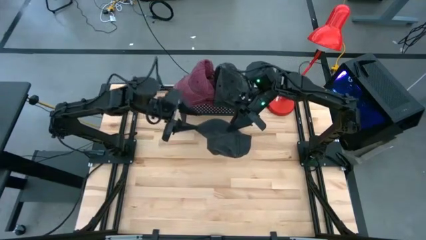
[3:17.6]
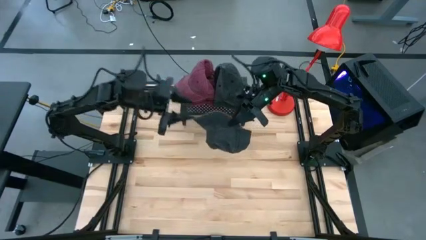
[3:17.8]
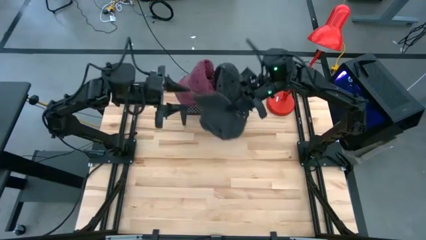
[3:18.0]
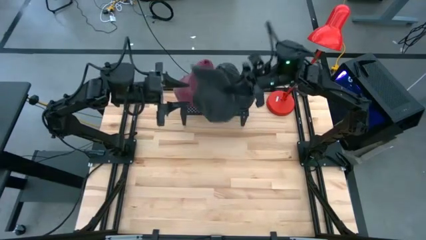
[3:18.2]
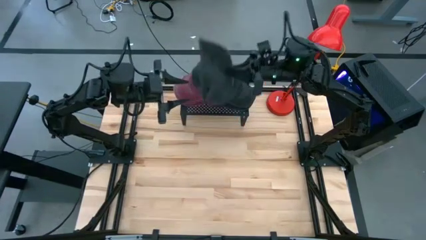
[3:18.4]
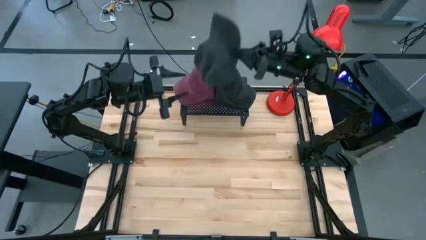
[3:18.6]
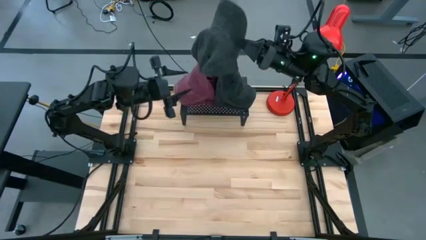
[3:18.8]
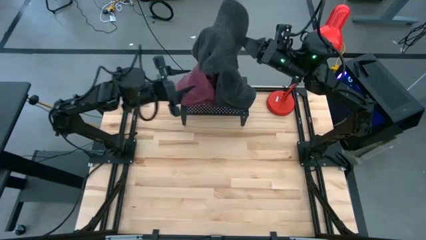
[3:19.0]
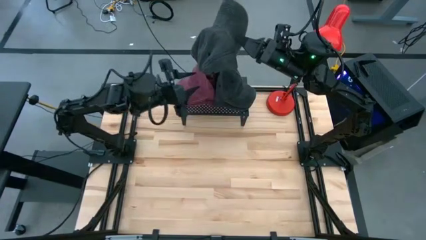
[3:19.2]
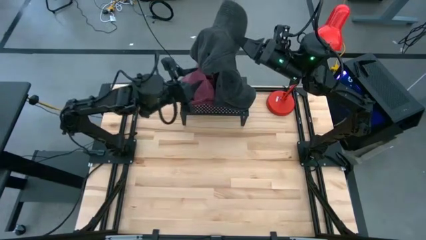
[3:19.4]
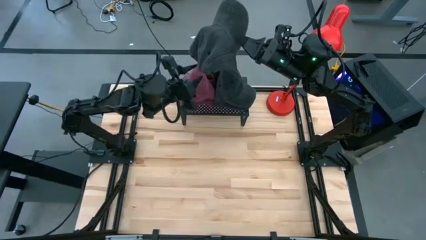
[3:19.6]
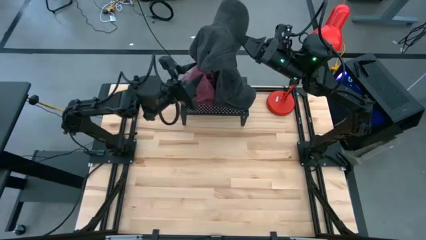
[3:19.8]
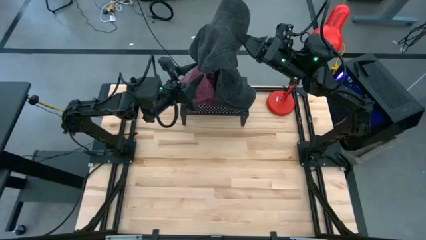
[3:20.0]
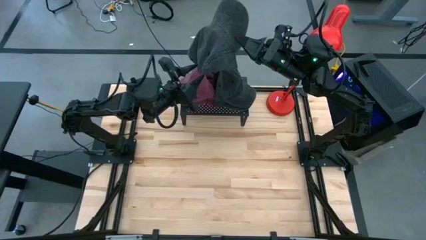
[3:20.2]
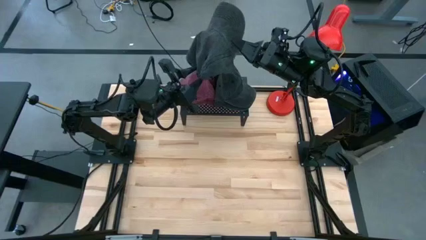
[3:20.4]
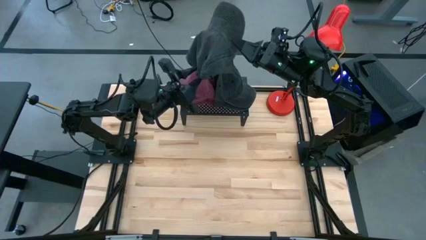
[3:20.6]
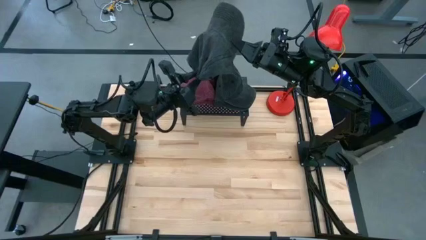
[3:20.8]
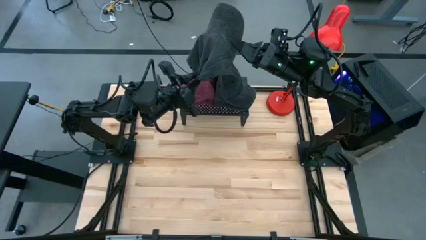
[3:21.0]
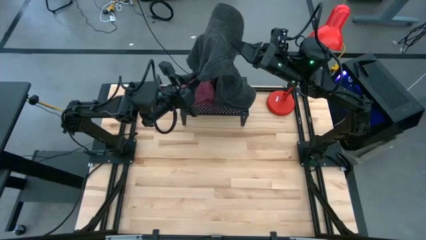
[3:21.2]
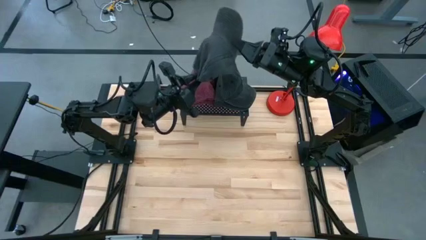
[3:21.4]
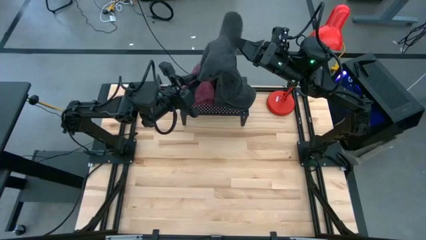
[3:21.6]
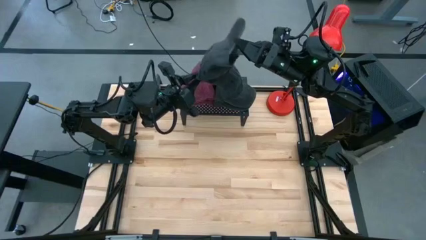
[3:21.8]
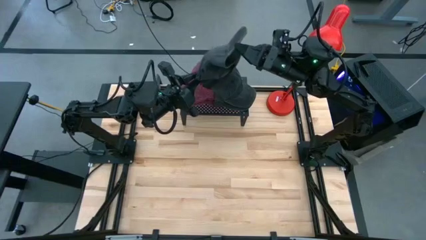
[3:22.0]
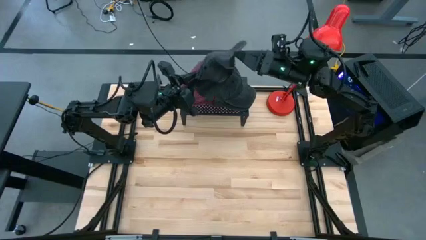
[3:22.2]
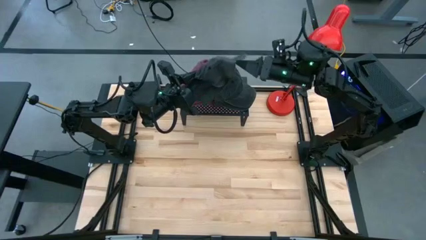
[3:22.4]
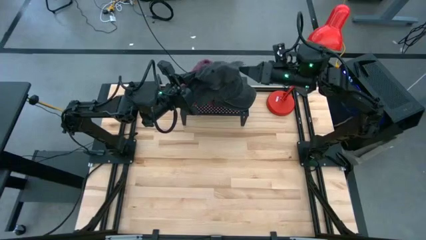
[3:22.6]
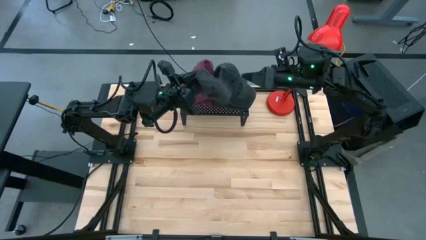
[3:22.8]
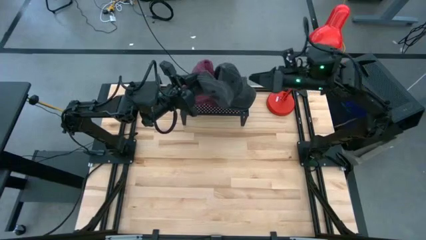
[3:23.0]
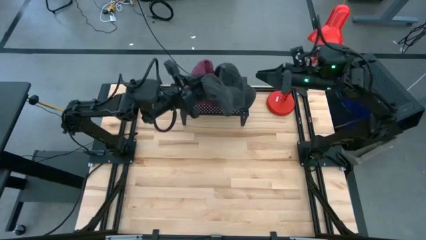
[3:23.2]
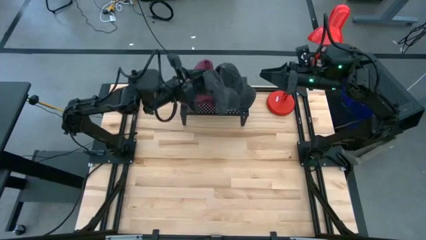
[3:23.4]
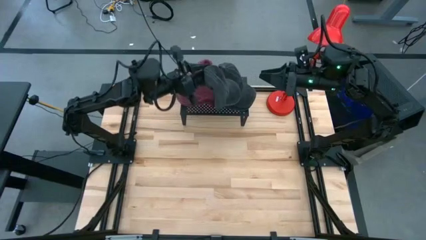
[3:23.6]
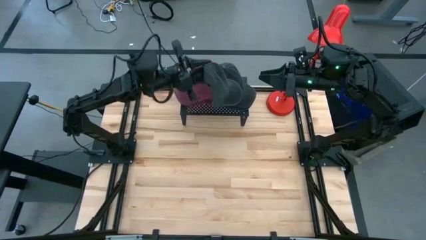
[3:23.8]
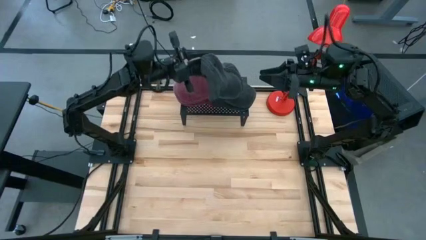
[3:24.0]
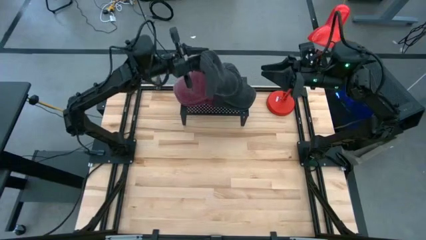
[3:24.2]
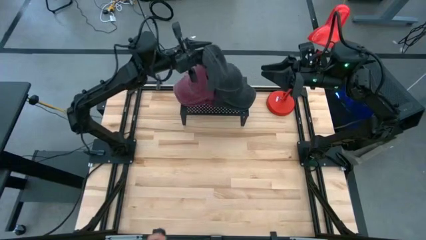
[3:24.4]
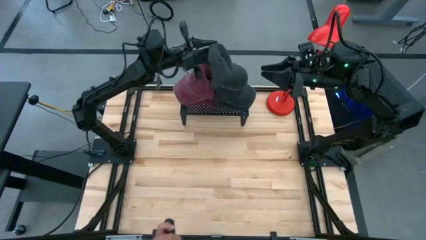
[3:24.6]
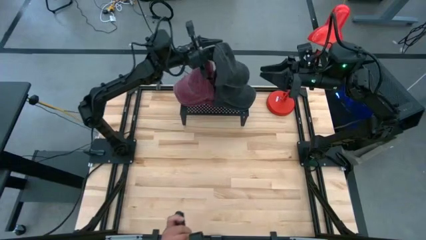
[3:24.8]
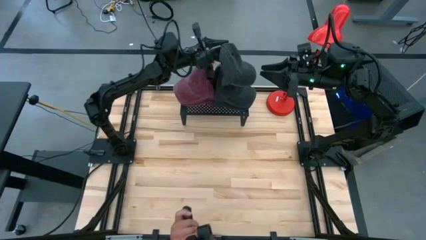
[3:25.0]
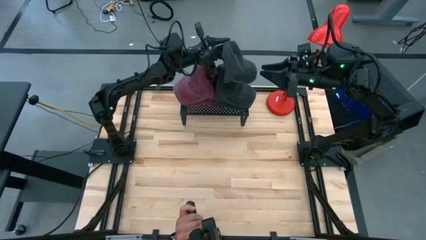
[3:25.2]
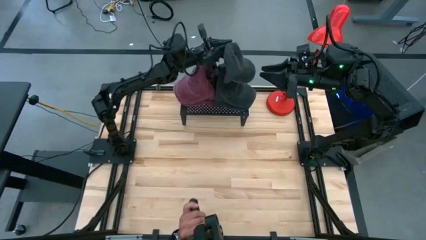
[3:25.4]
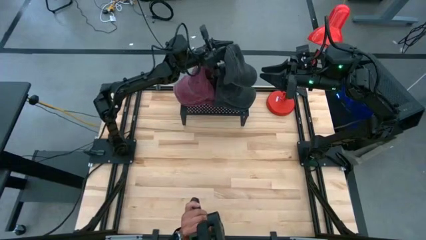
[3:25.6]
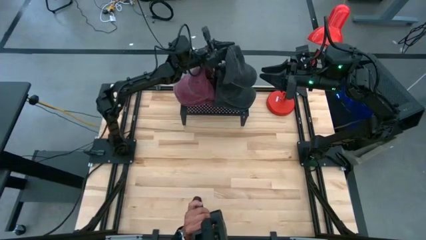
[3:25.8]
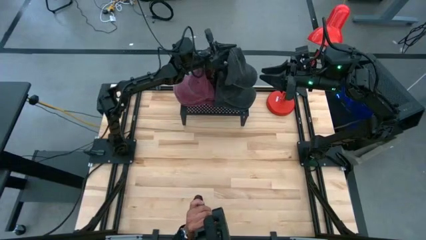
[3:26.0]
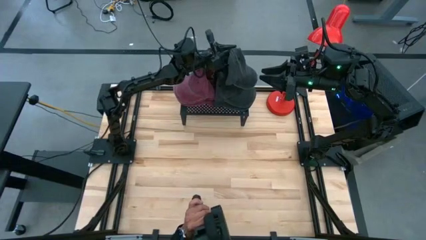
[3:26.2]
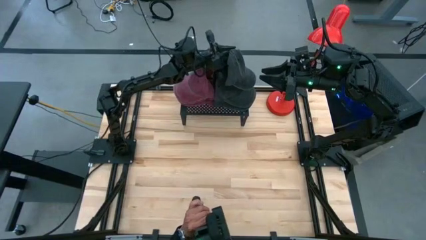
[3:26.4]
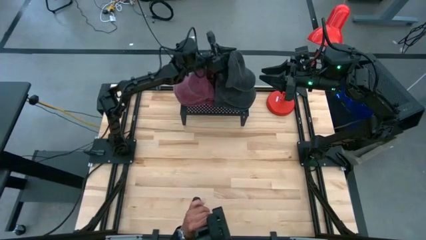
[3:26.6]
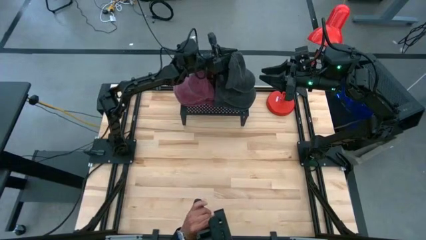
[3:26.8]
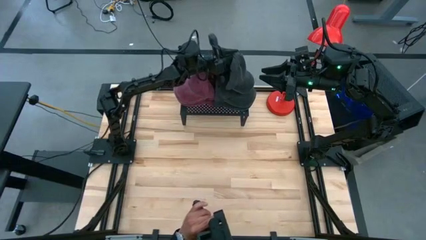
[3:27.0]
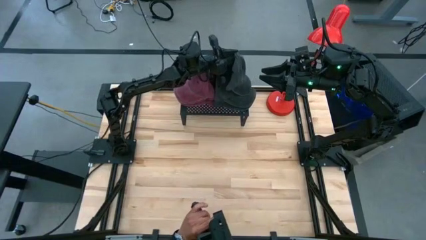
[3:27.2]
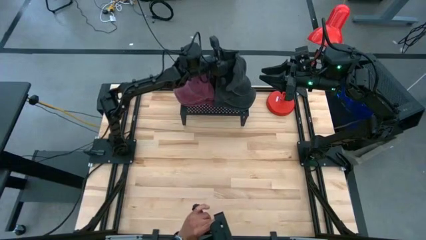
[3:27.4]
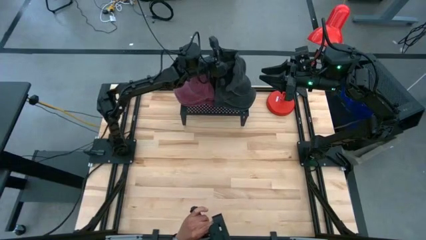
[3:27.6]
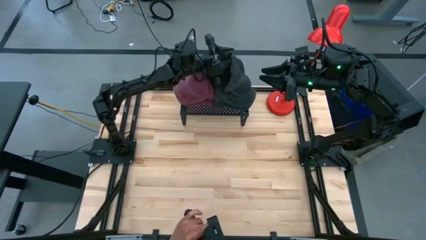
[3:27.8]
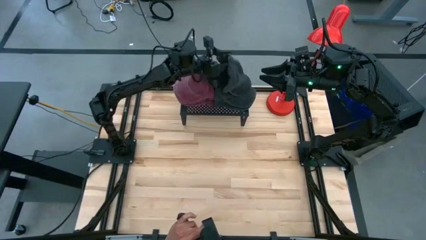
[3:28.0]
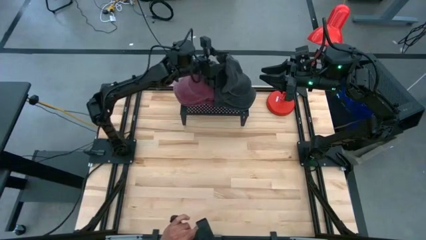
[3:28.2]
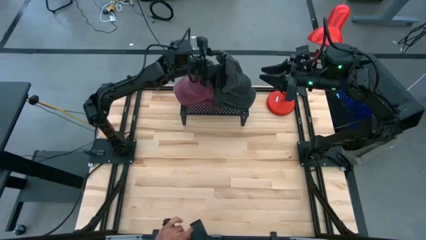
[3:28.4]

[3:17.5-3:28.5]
Task: Pick & Place hat
Put the black cap on top of the stacked black caps on the shelf

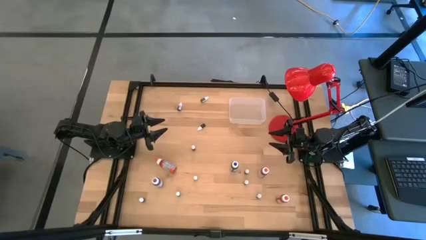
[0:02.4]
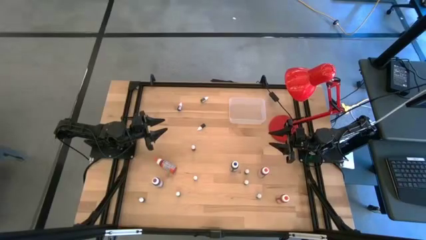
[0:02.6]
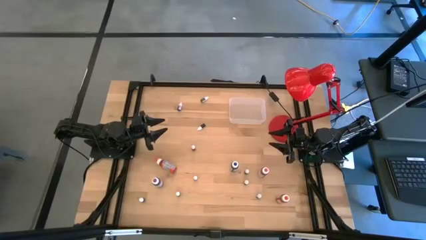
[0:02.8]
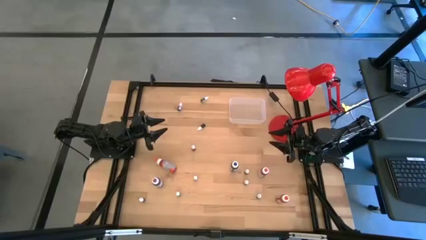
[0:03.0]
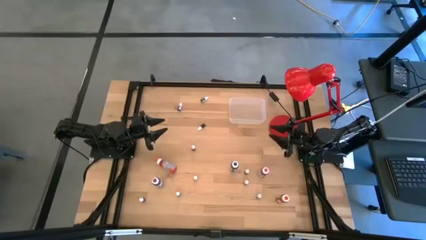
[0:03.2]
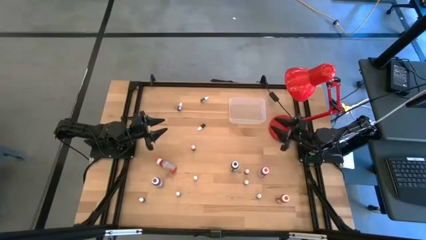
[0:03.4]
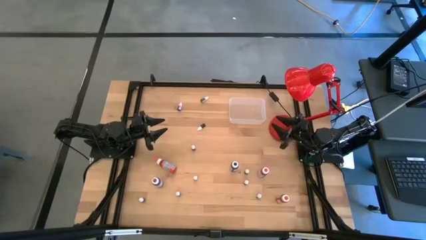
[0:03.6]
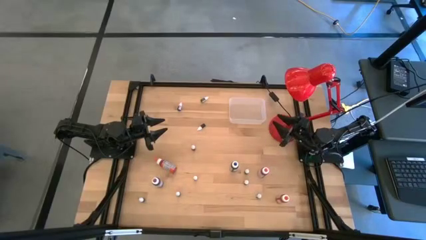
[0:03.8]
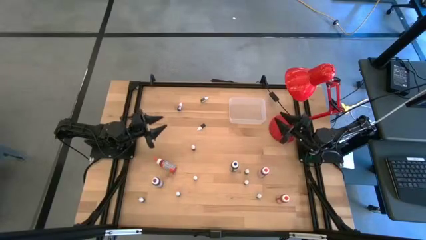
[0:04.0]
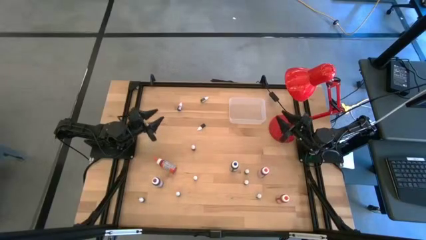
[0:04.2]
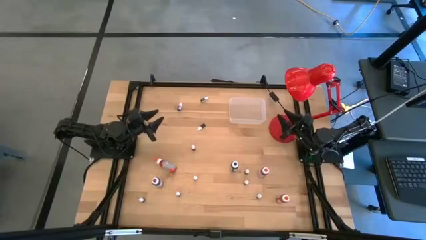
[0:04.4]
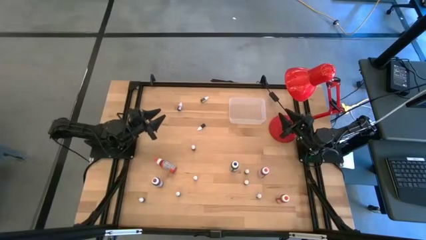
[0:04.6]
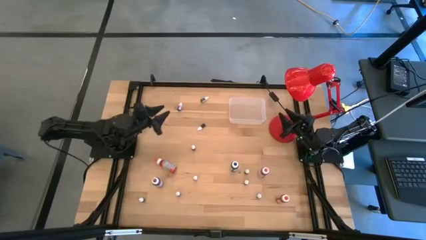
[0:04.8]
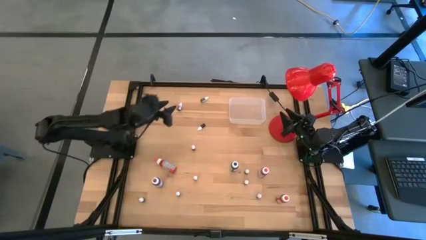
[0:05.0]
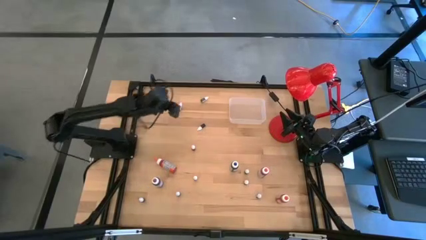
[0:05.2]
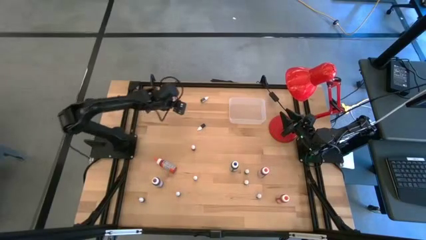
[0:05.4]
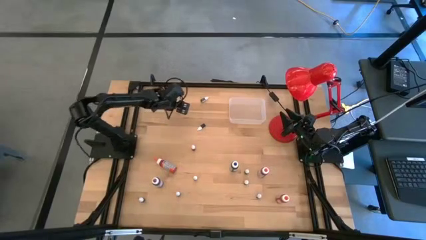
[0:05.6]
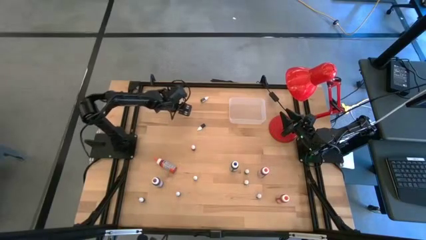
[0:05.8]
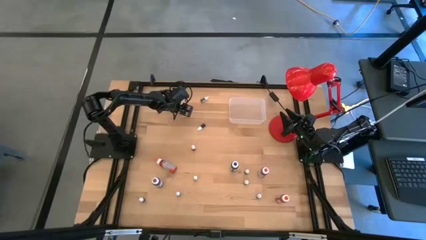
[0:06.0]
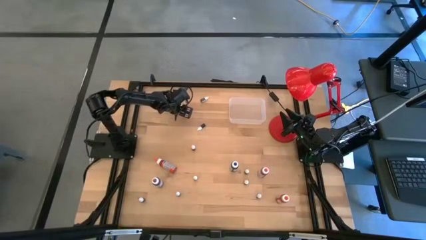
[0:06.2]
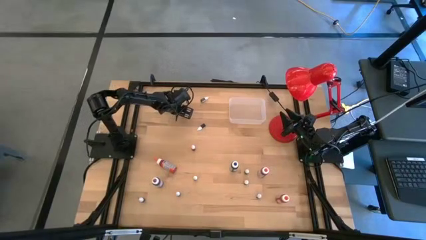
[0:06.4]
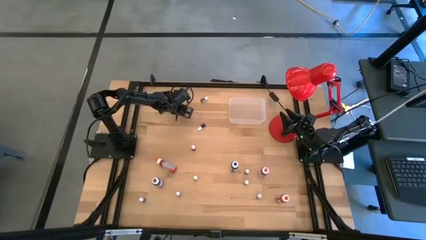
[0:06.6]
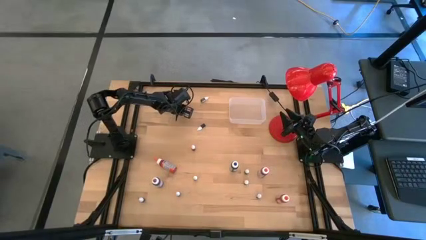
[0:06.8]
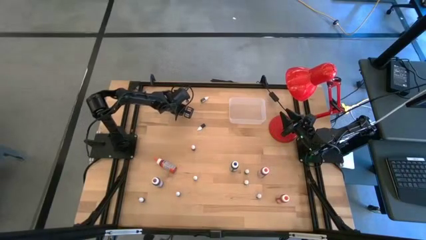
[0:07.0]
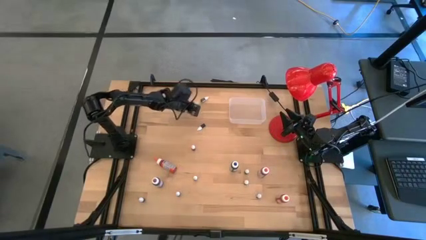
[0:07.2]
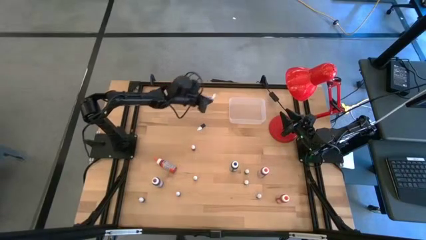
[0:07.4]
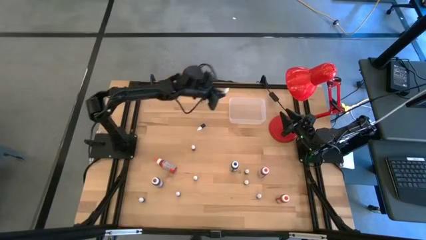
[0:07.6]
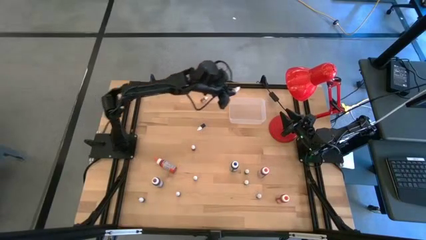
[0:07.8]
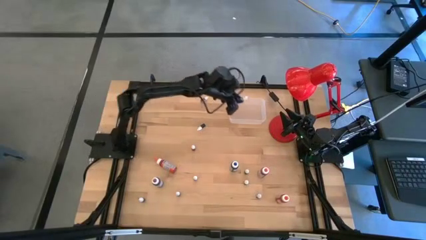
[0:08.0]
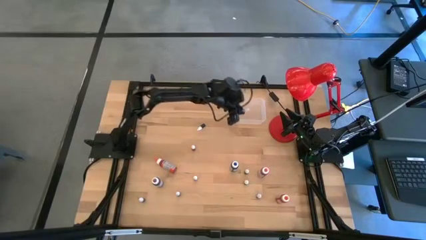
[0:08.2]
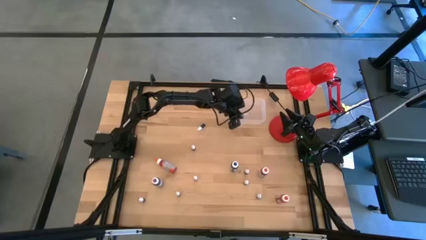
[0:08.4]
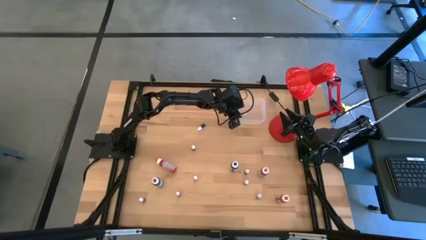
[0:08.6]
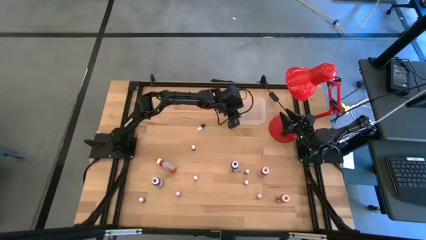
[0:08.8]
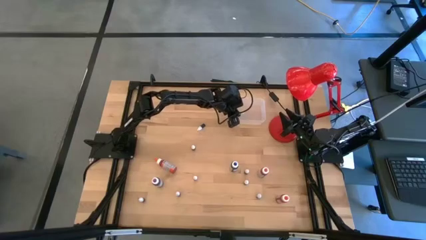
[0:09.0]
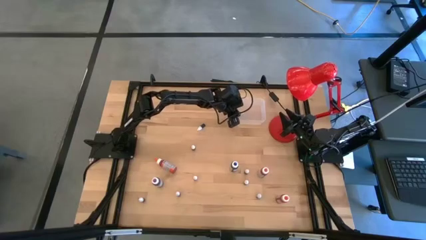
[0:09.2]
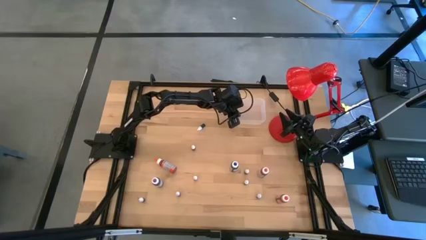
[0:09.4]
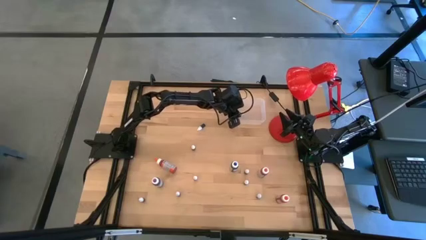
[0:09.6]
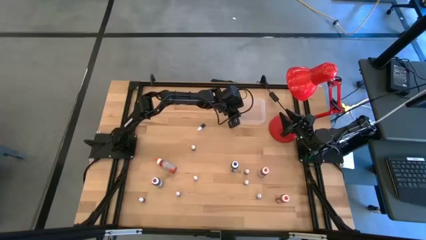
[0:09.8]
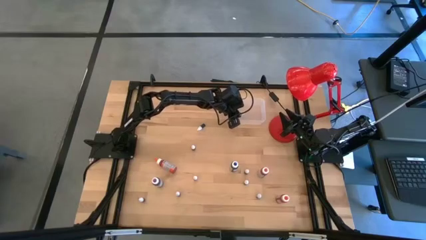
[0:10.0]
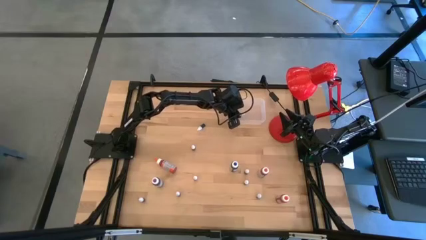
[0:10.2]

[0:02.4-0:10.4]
Task: Pick & Place food coloring
Put the small purple food coloring bottle in the transparent bin
